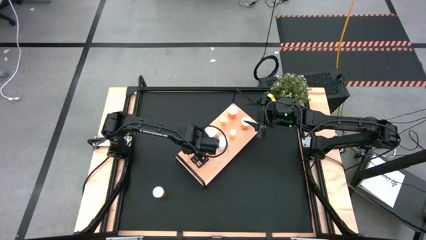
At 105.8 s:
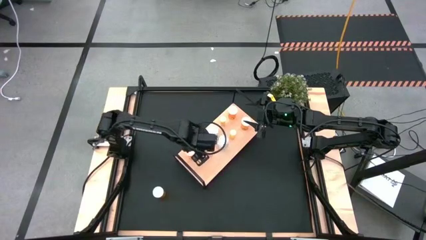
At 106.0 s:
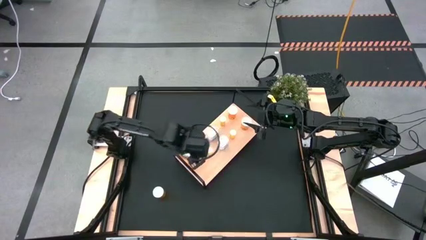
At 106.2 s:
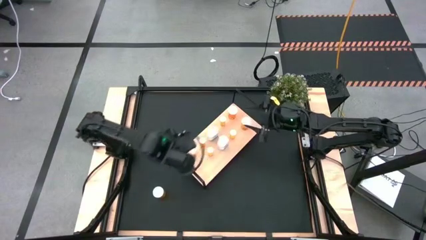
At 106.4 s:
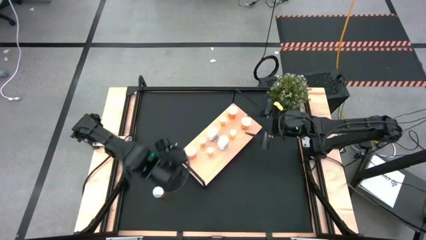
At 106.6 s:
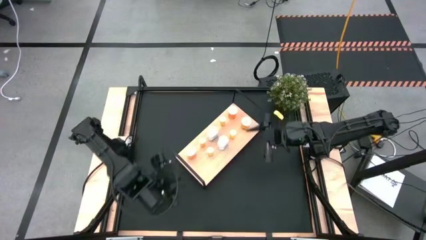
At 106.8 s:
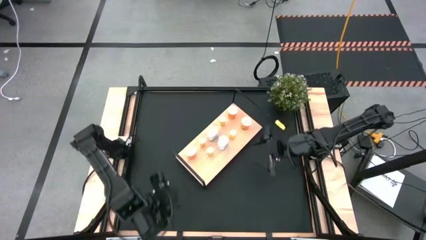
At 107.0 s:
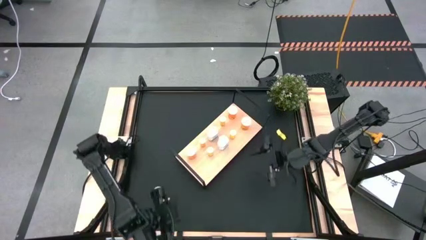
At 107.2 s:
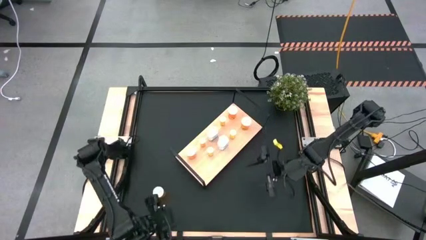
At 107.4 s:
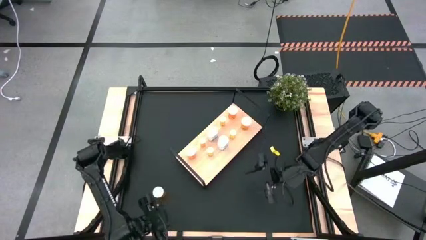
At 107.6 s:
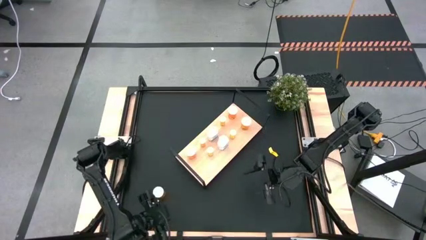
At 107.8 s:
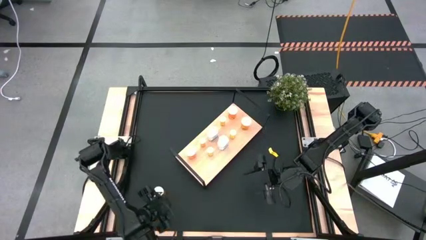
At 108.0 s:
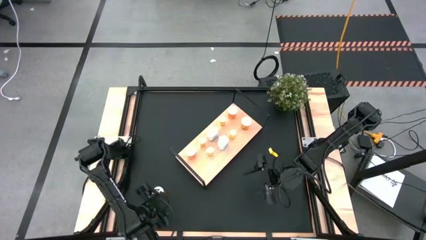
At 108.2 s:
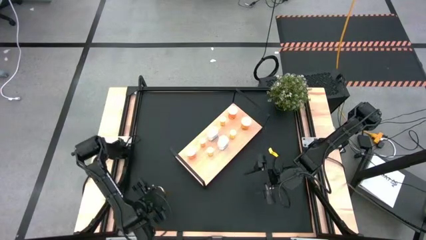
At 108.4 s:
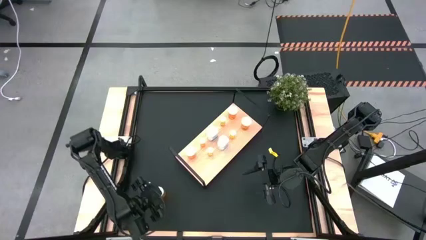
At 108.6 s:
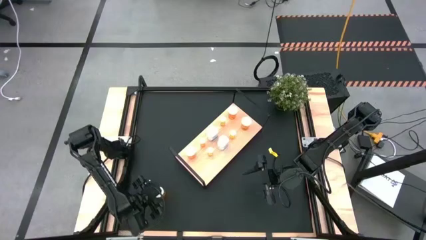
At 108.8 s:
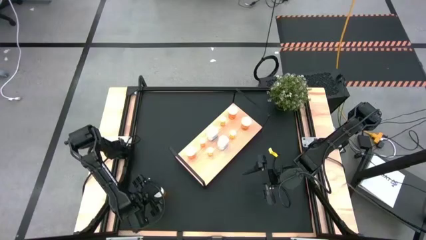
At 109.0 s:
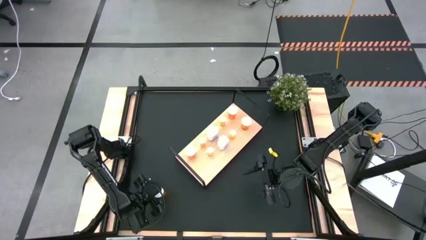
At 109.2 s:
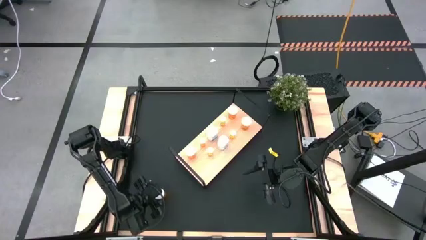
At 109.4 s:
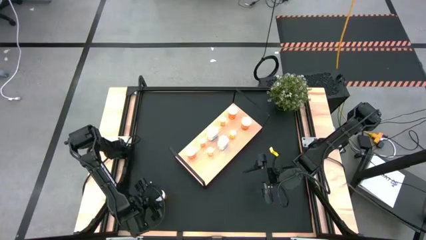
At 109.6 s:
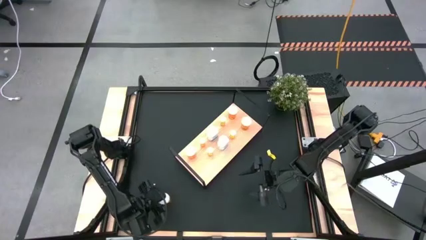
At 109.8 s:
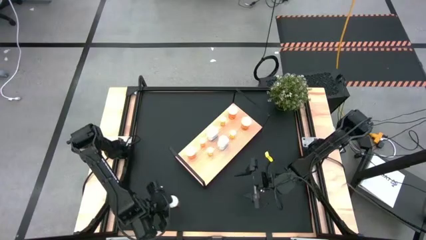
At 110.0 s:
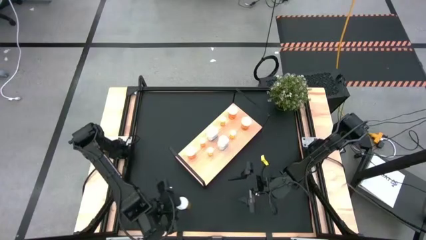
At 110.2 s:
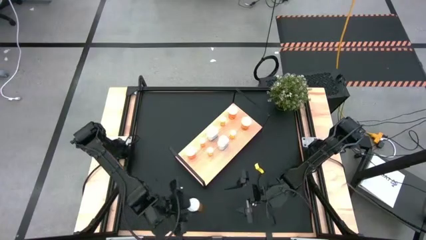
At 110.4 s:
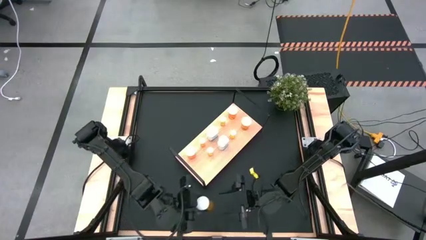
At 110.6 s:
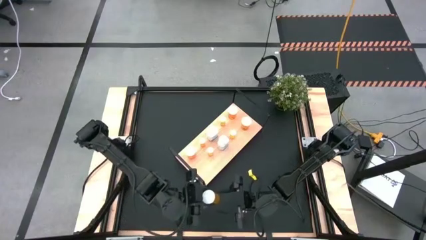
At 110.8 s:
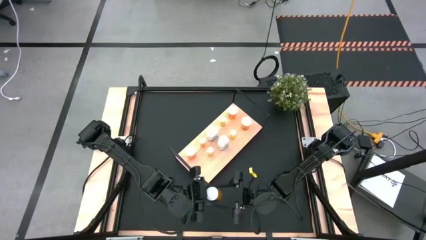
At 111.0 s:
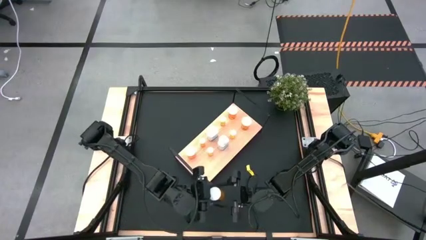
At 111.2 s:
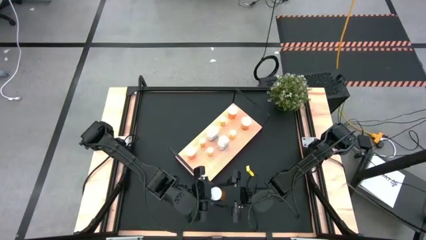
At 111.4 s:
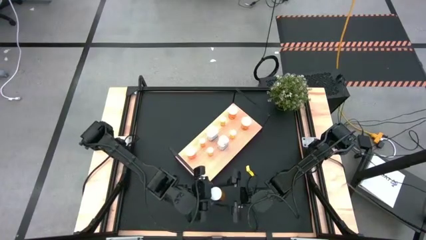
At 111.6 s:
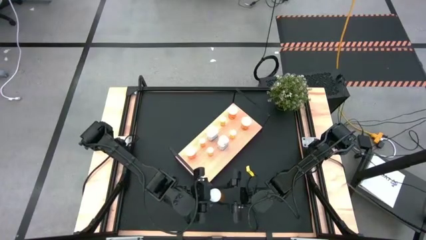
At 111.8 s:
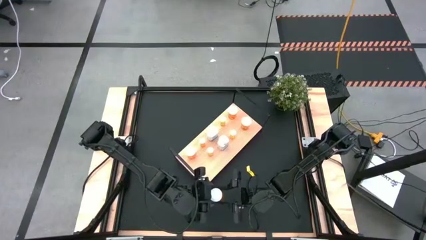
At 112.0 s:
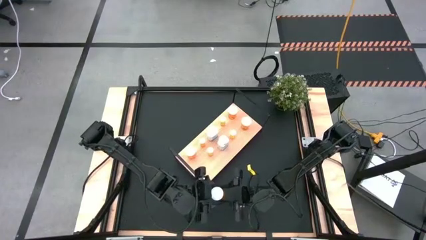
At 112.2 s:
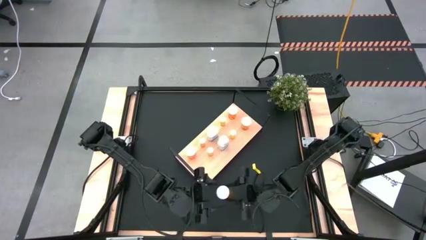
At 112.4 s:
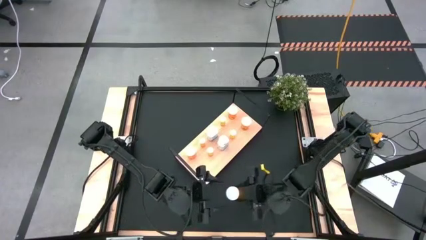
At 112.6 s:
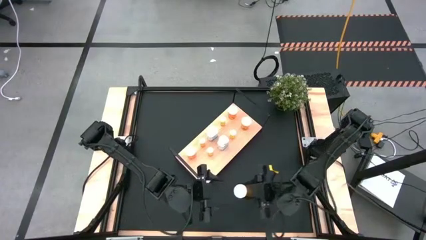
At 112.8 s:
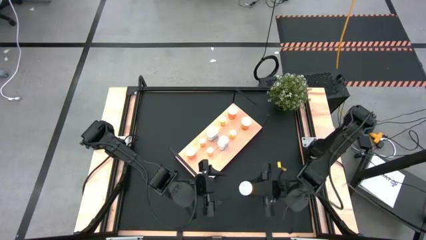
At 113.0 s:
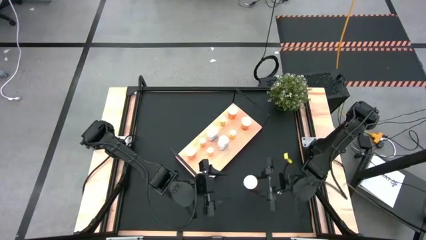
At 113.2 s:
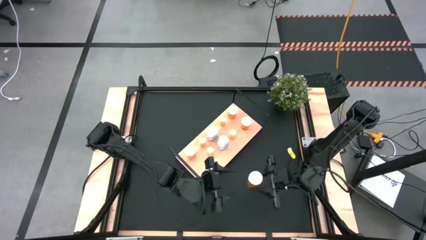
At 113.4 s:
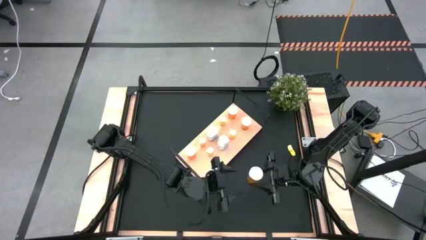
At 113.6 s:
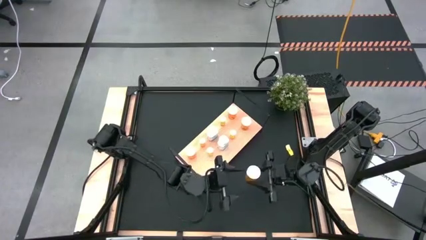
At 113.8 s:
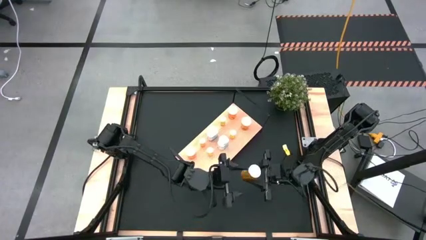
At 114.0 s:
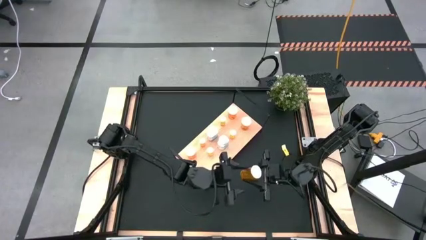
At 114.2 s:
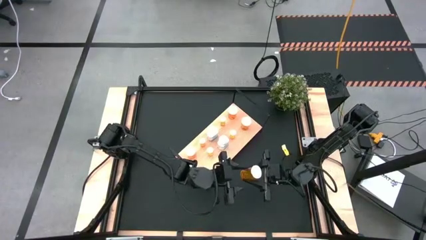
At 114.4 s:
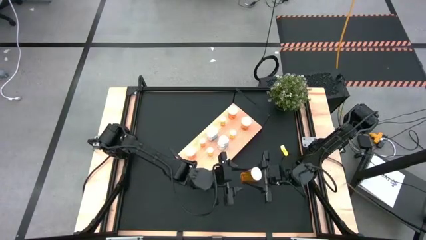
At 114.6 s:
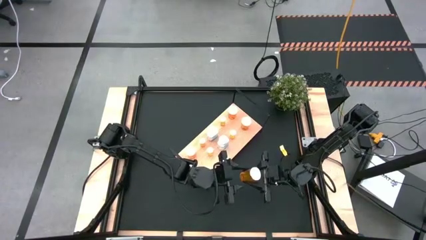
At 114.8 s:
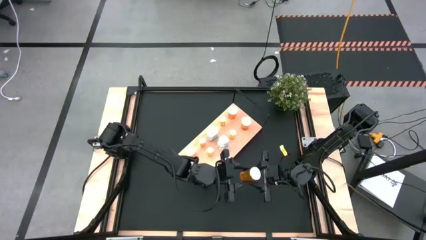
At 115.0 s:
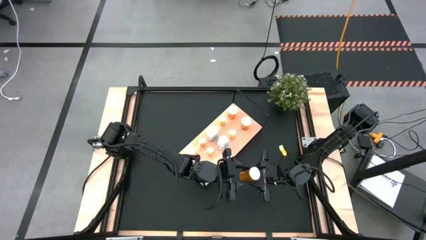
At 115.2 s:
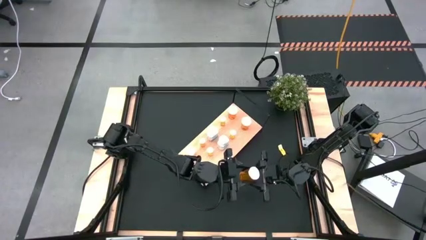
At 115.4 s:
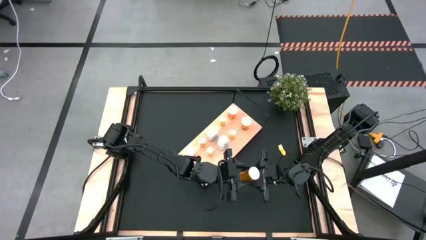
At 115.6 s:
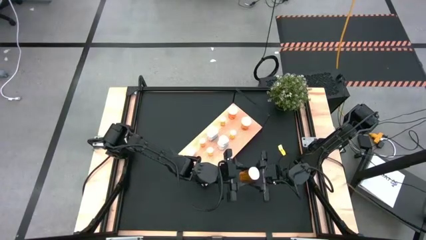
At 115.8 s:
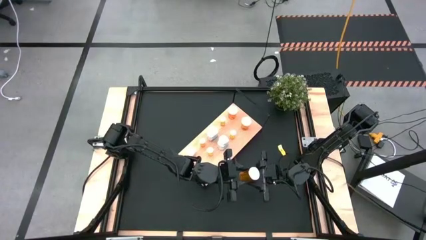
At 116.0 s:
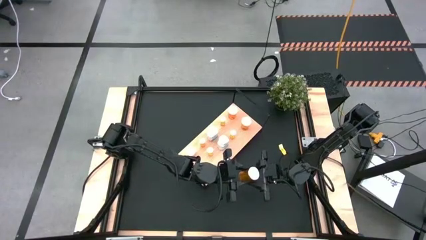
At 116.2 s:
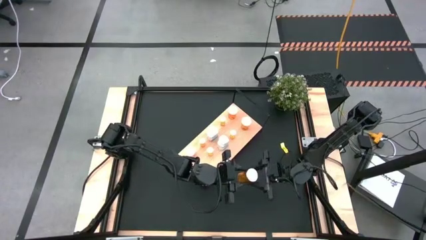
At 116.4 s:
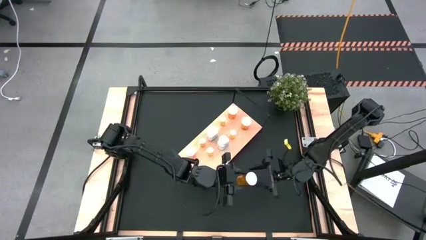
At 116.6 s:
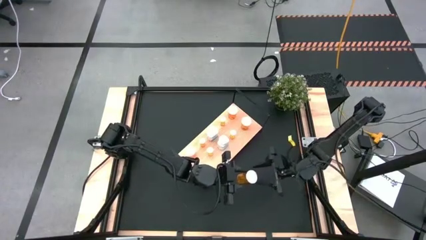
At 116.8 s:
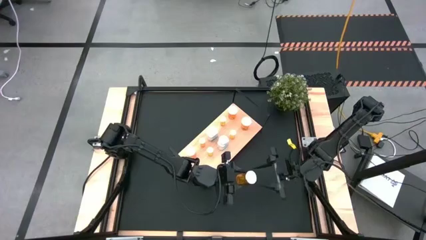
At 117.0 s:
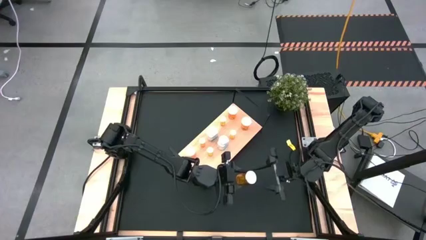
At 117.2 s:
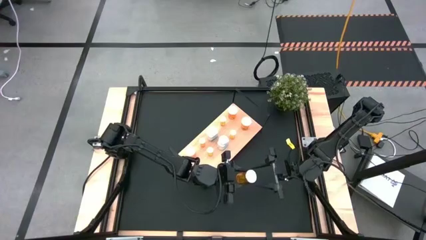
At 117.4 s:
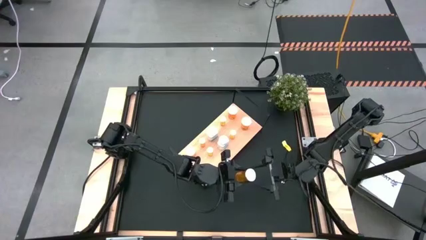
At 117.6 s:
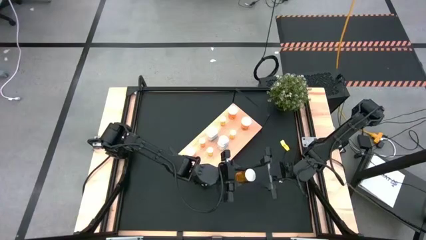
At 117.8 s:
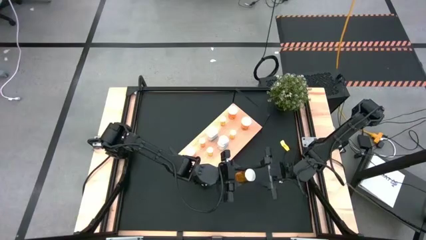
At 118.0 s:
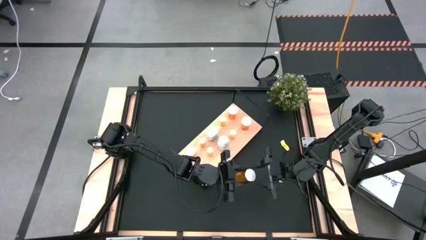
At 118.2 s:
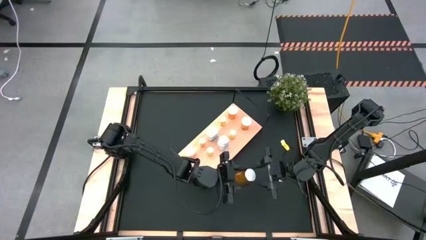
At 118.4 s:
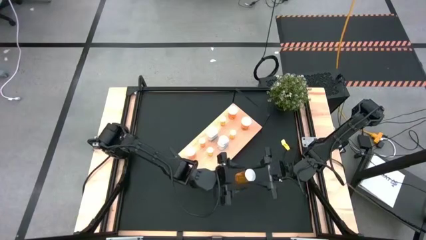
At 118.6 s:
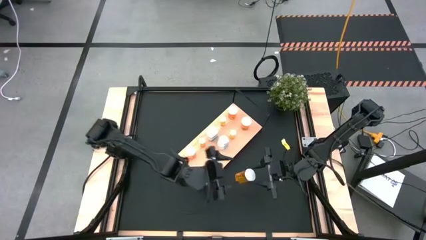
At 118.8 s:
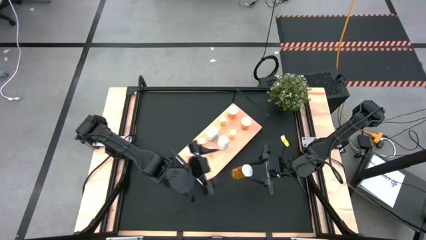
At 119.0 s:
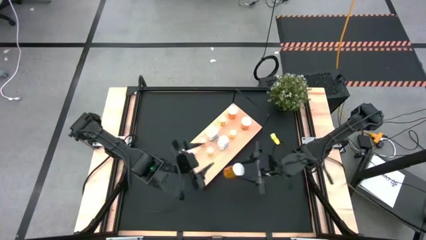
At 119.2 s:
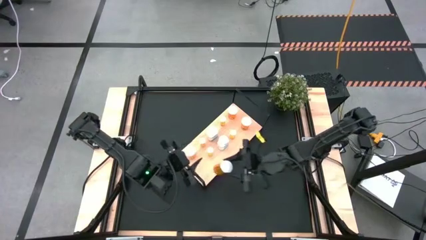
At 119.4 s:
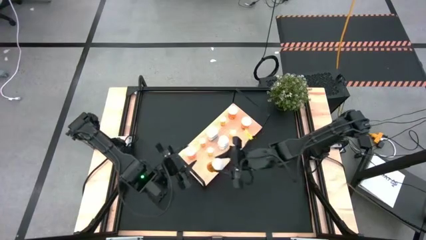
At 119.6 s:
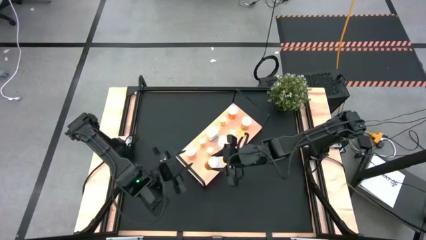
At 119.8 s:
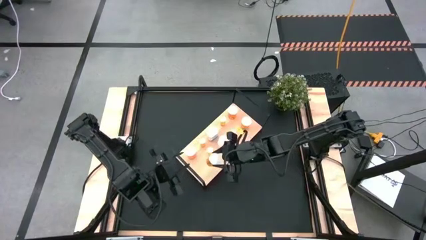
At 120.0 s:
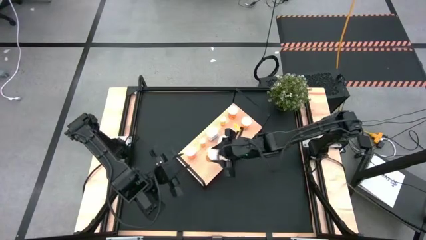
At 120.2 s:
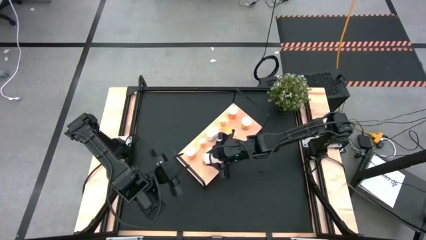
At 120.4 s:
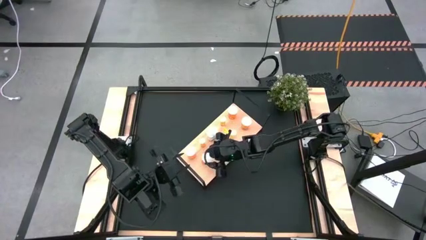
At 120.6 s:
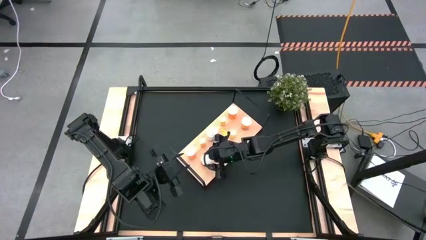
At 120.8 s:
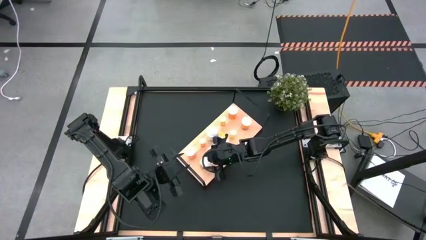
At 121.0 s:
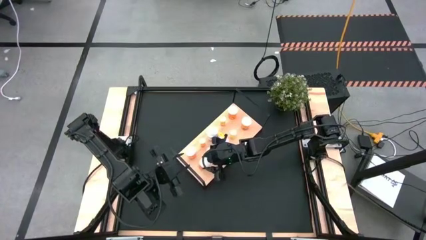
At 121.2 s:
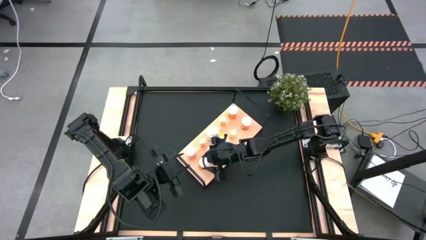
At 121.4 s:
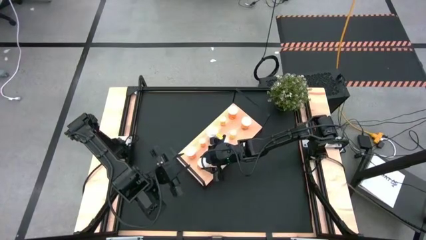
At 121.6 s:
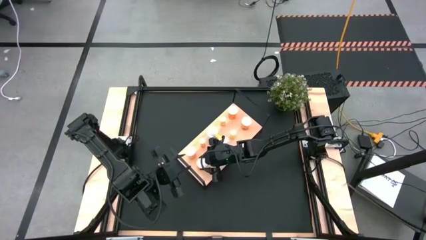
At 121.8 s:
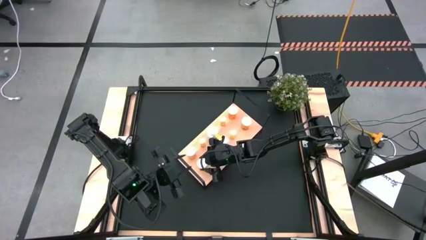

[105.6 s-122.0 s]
Task: Pick and place medicine bottles onto shelf by color
Align the large pill bottle with the other large pill bottle on the shelf

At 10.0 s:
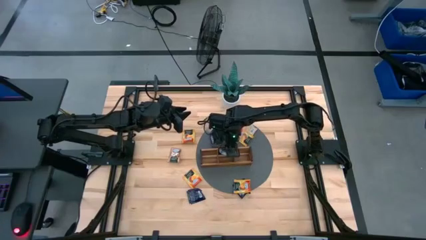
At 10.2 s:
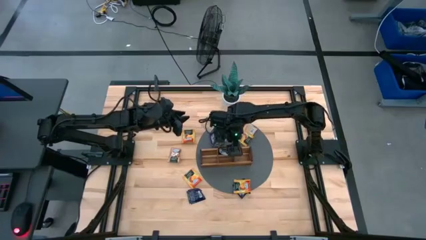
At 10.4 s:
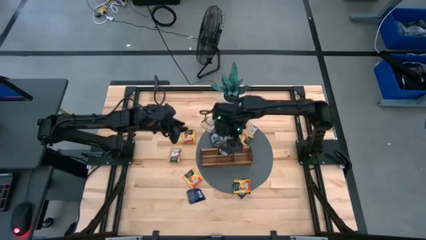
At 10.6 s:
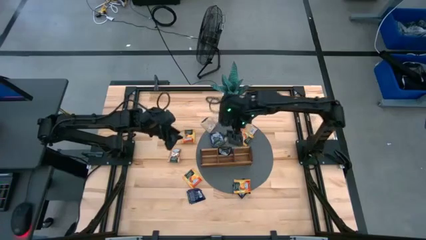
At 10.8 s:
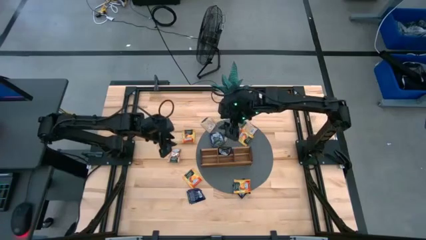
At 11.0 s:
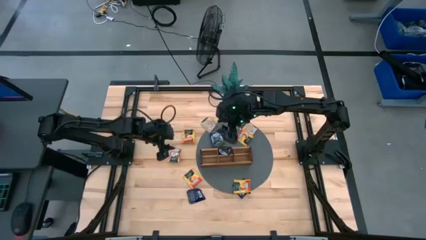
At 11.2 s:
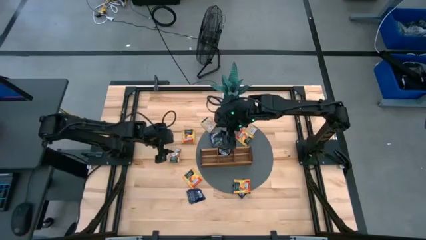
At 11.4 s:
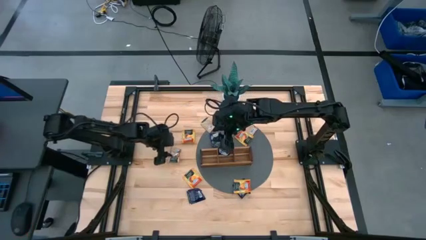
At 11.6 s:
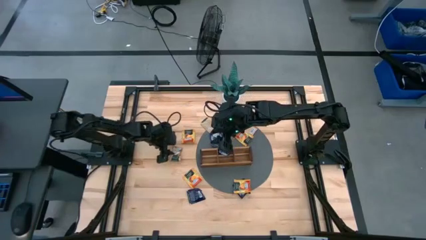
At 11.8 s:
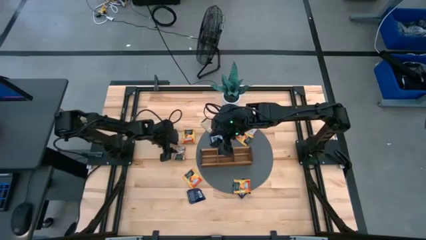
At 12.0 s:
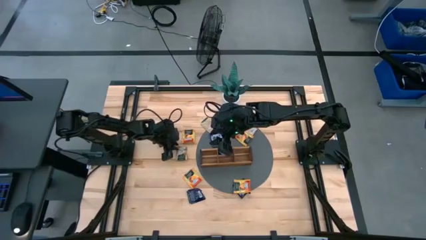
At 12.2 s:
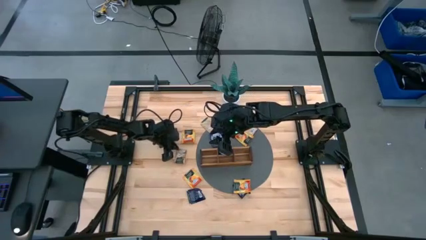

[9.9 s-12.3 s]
Task: Pick & Place Tea
Put the brown tea bag into the left section of the wooden organizer
